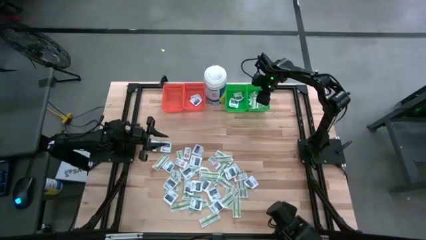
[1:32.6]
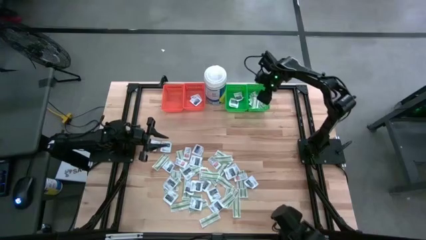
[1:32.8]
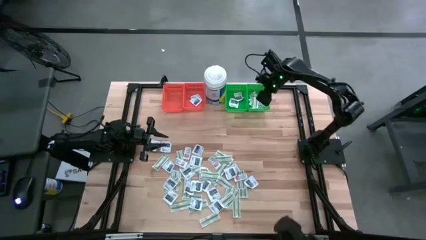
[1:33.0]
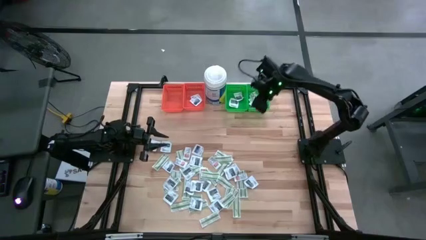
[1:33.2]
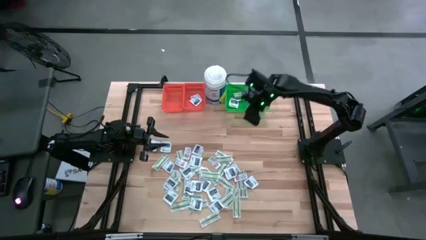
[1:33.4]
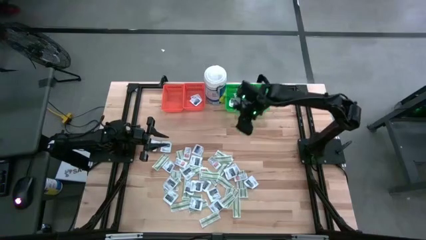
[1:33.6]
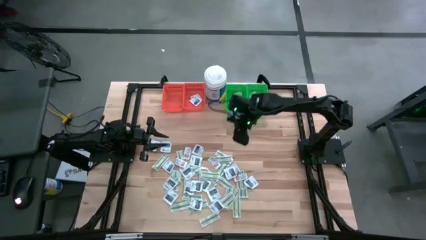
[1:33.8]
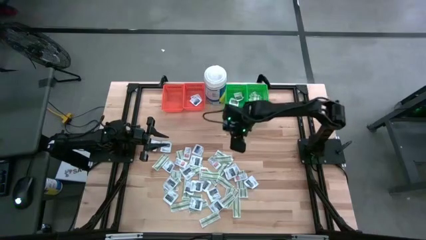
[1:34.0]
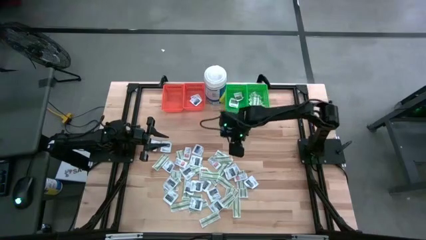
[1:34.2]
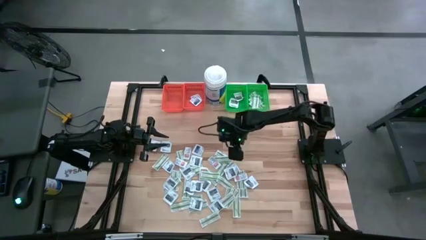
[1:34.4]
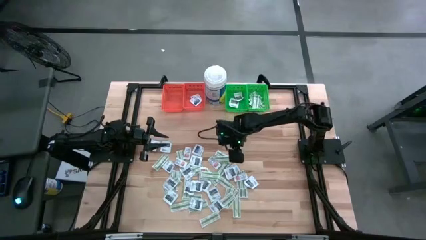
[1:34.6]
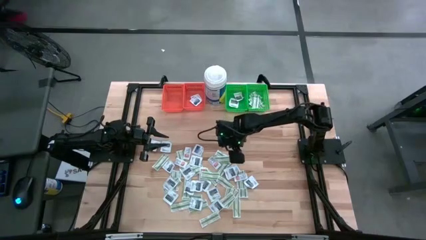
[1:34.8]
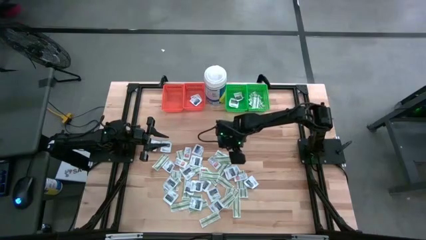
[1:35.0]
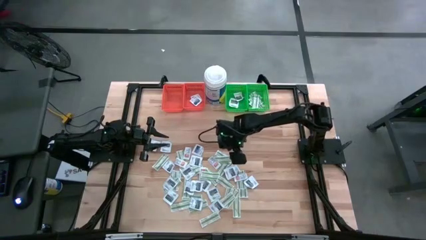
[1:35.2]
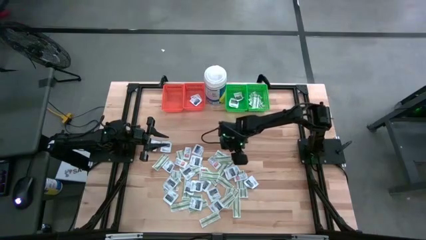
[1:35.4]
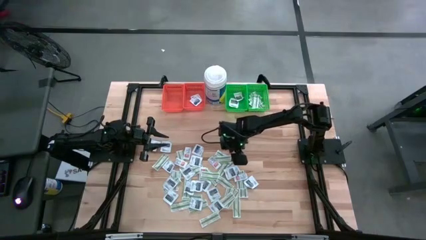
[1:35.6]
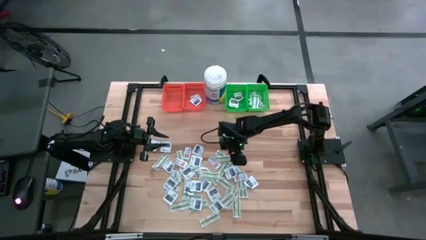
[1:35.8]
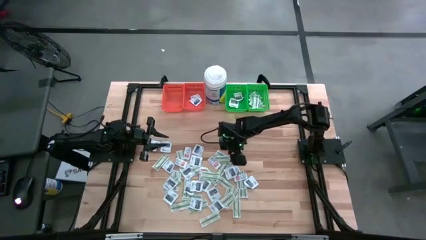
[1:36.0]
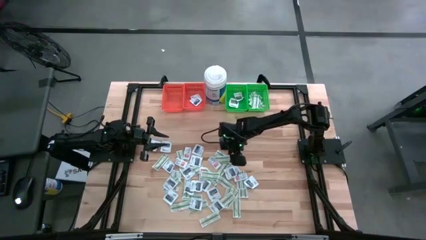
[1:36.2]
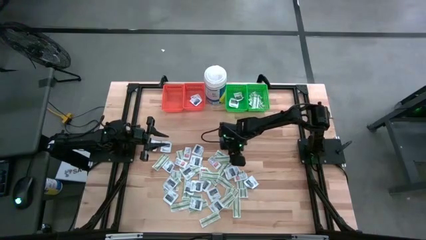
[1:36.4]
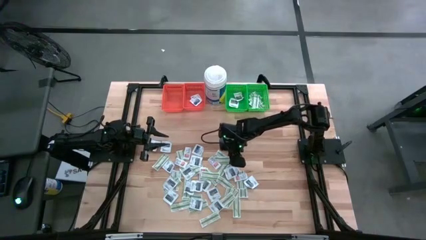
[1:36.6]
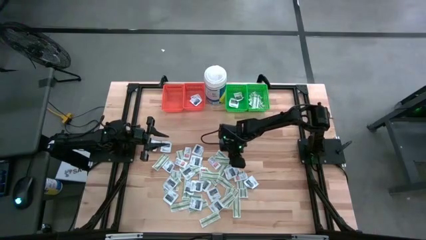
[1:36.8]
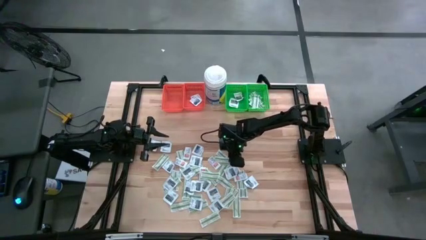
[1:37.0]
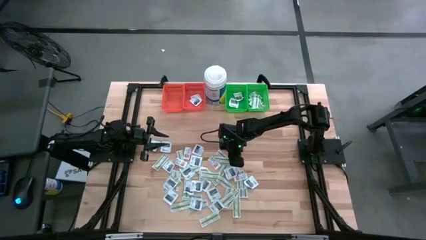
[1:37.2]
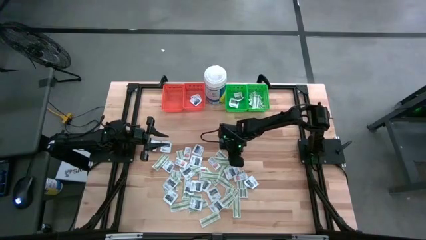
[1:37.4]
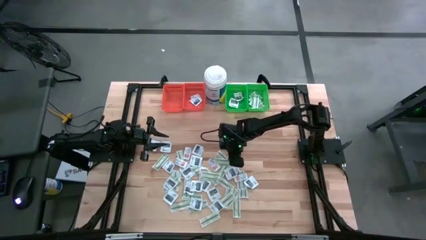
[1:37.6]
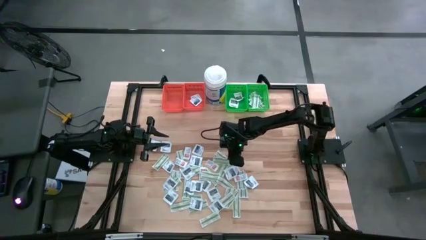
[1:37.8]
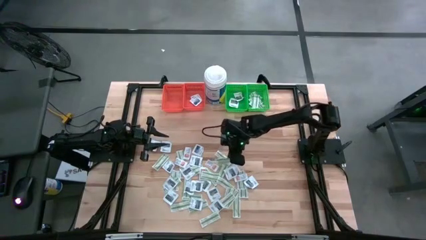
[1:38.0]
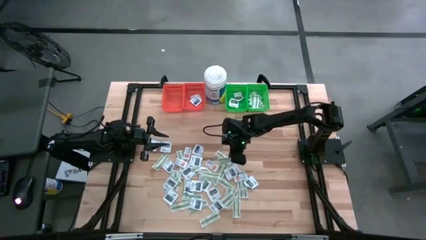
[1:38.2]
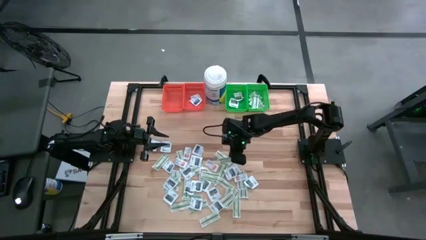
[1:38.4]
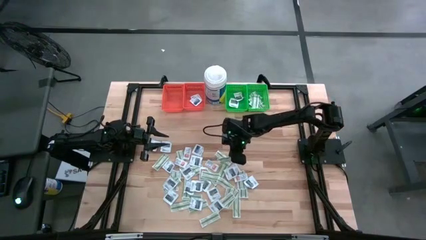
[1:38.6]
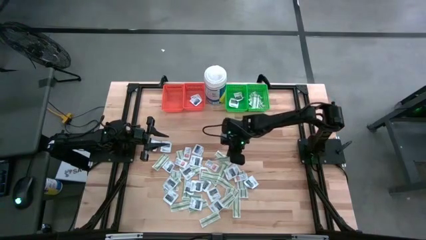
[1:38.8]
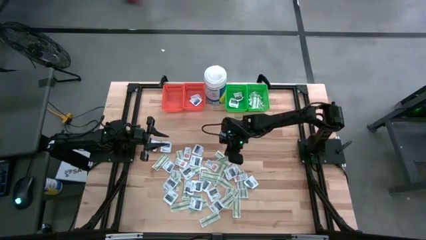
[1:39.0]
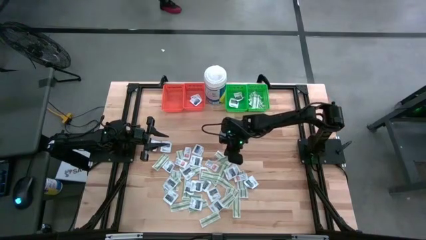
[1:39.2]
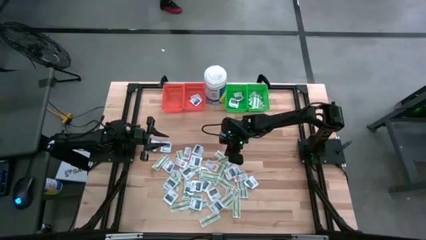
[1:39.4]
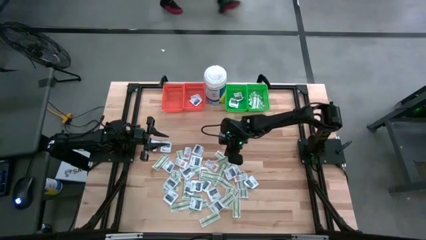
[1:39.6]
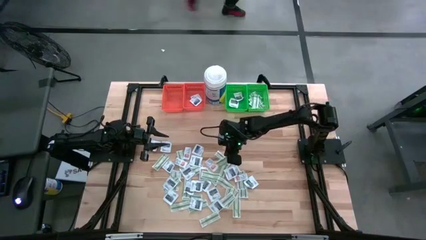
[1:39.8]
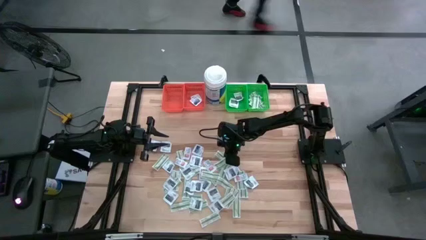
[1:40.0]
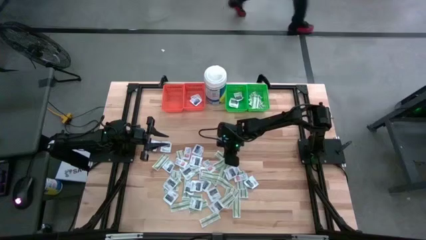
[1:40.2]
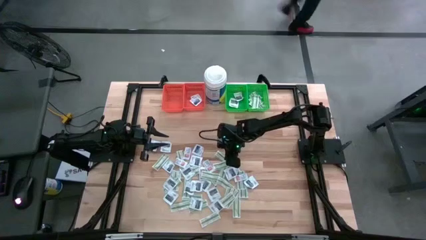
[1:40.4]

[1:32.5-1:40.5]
Task: Pick & Place First Aid Supplies
Put the green bandage pack into the right green bin

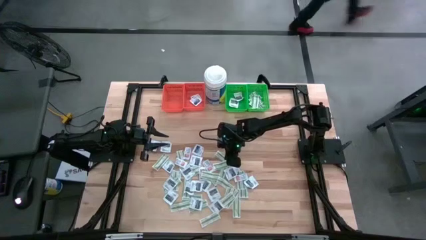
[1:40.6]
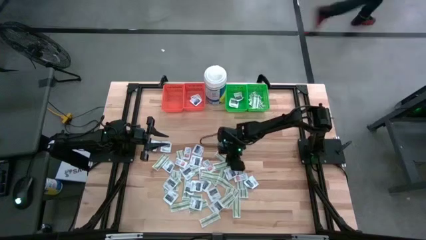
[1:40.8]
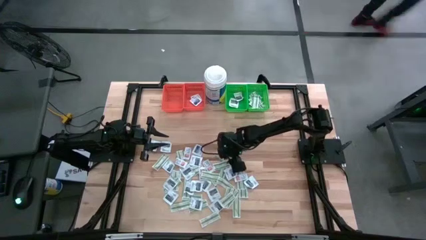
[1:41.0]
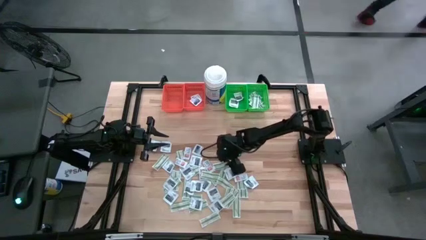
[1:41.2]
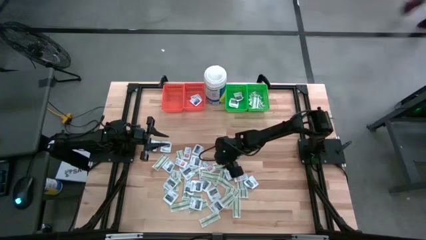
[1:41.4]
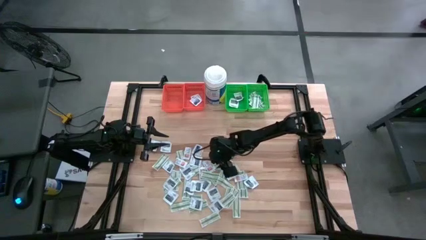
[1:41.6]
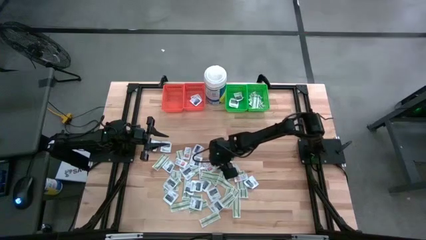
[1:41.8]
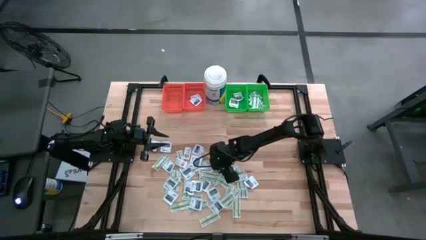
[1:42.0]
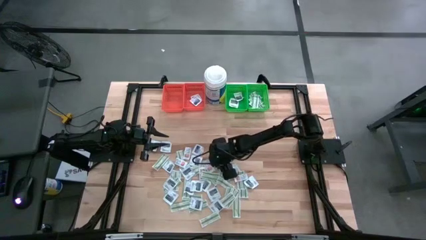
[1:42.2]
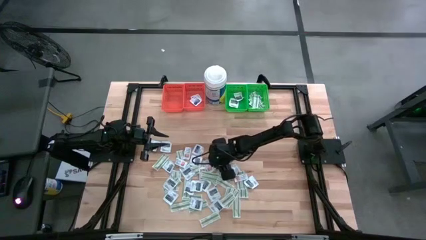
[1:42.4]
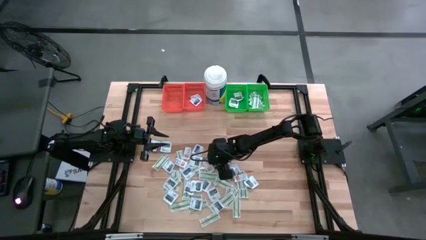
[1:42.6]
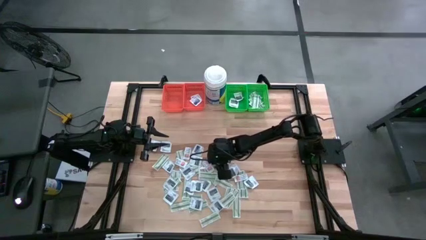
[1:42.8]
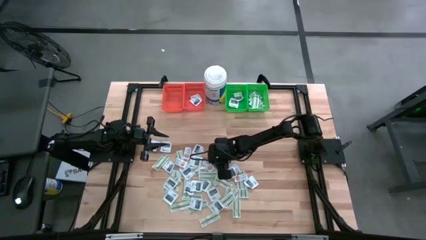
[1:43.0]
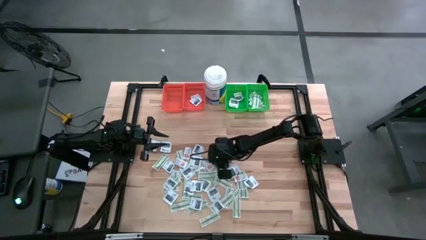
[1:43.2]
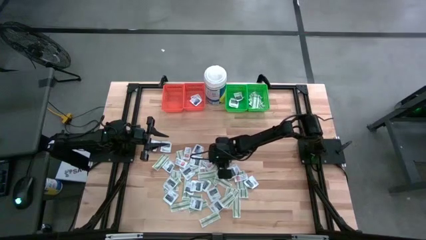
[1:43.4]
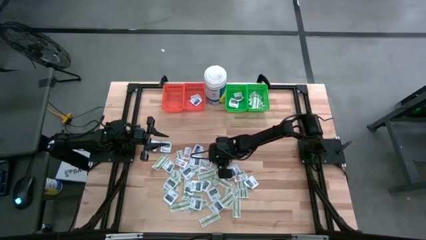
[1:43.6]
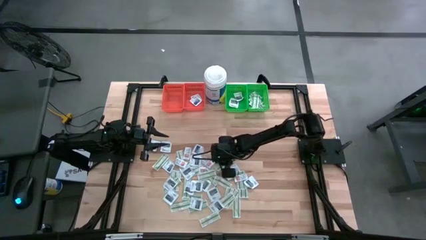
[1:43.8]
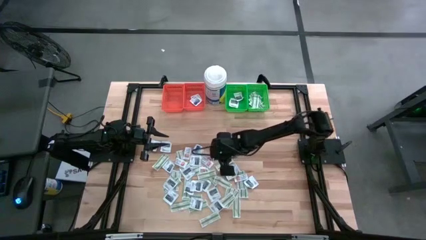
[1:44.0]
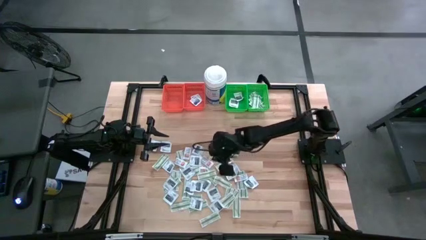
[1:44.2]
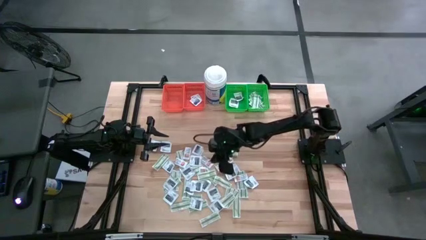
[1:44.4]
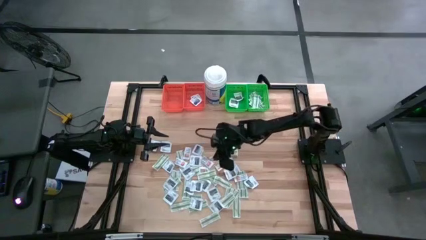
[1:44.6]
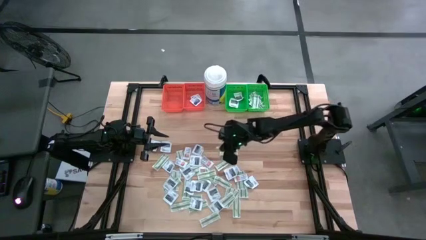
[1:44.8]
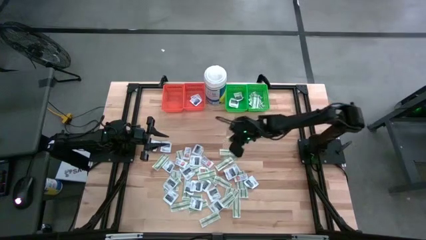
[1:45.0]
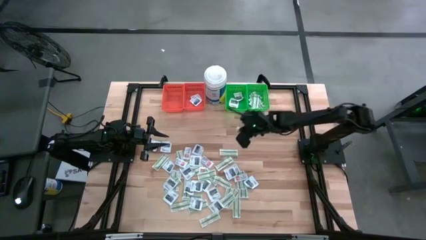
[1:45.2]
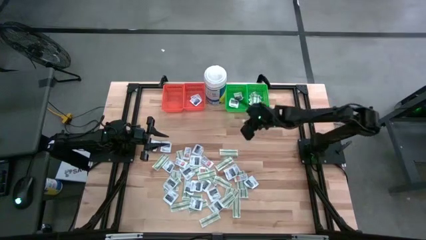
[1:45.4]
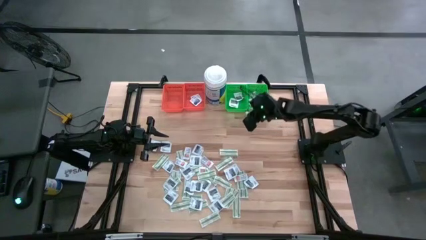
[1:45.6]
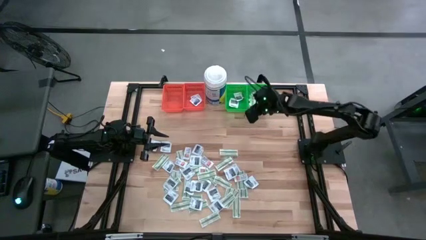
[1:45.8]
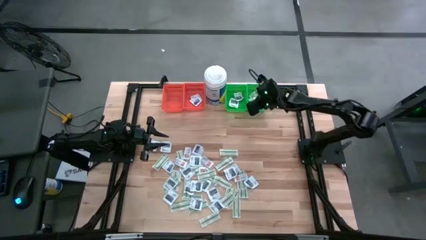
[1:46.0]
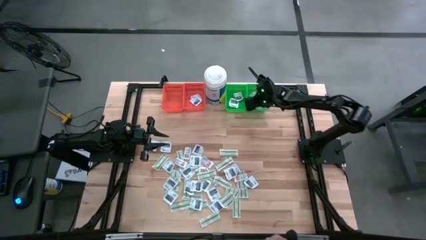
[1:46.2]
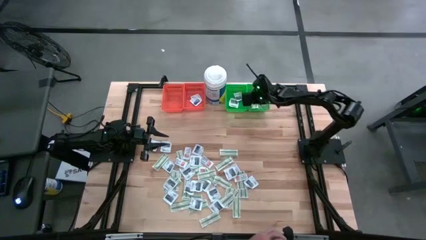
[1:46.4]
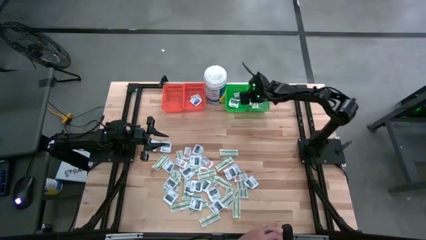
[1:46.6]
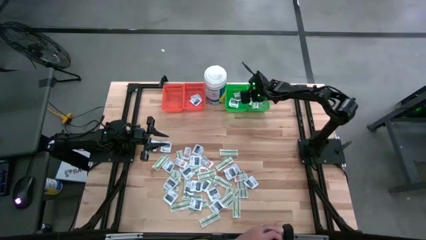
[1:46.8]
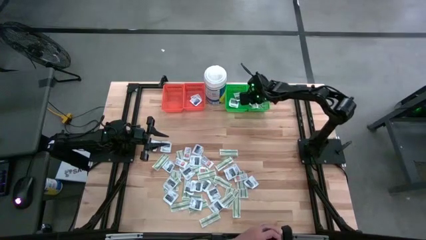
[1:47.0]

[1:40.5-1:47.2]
Put the green bandage pack into the right green bin
